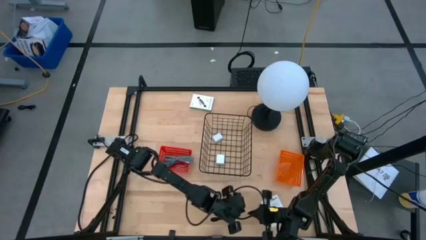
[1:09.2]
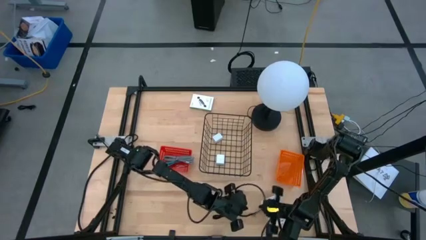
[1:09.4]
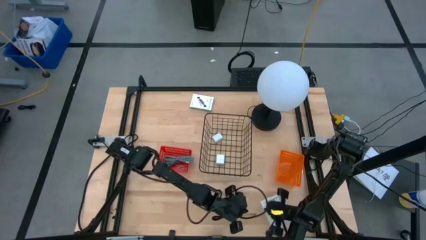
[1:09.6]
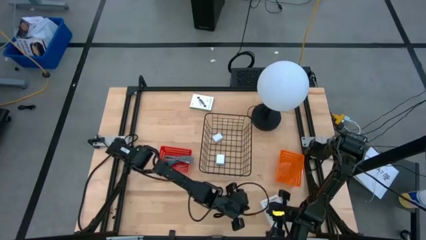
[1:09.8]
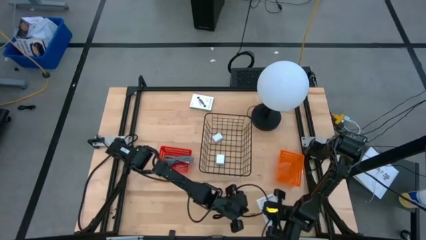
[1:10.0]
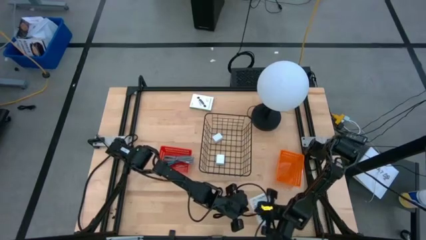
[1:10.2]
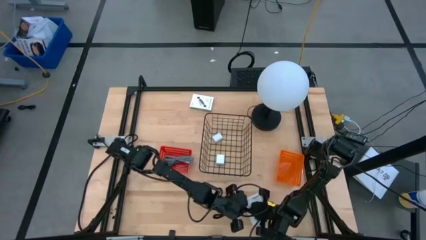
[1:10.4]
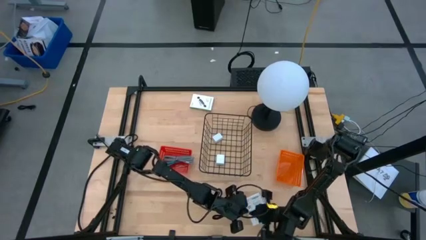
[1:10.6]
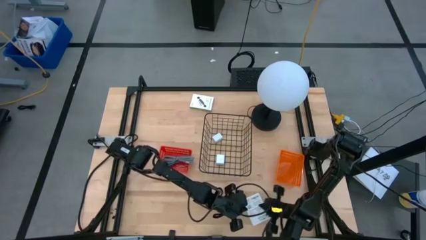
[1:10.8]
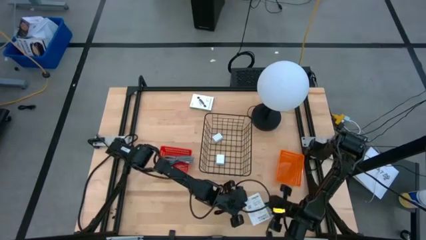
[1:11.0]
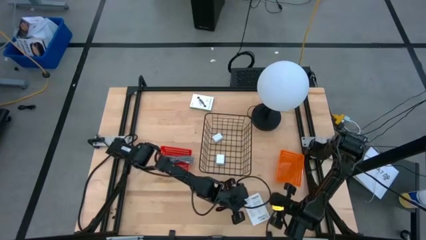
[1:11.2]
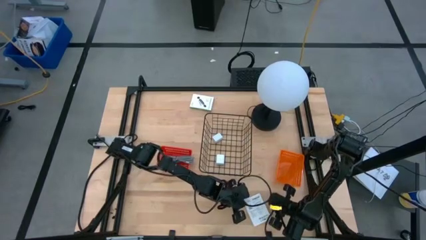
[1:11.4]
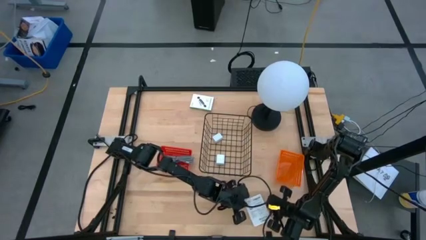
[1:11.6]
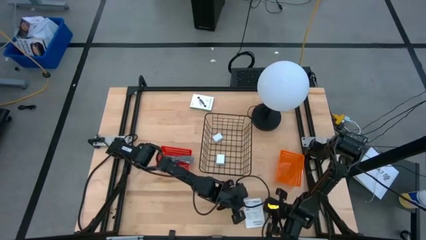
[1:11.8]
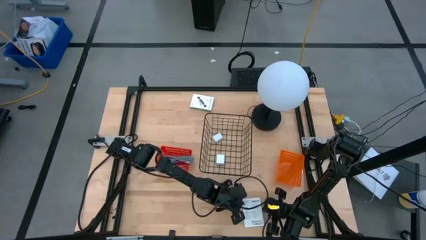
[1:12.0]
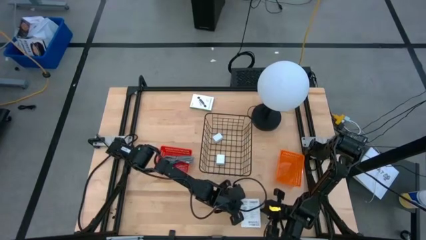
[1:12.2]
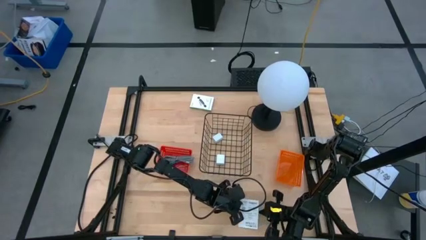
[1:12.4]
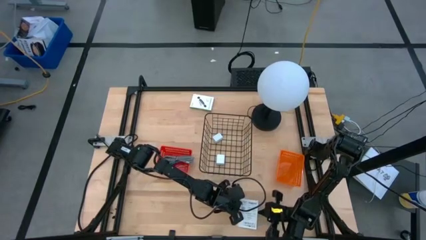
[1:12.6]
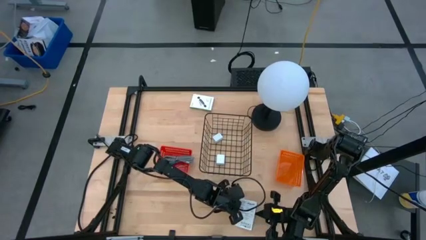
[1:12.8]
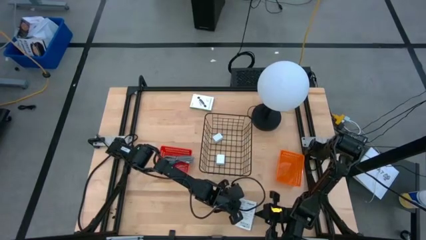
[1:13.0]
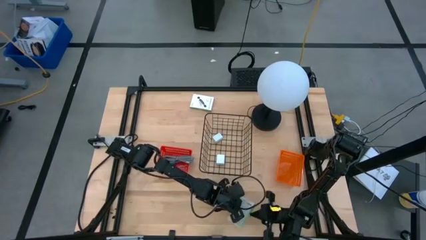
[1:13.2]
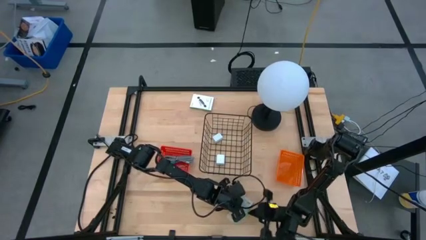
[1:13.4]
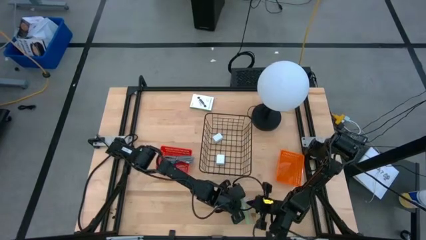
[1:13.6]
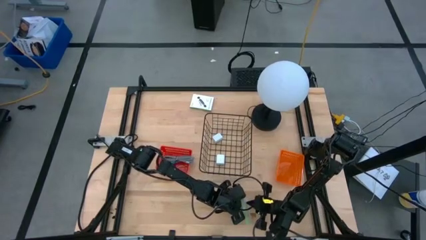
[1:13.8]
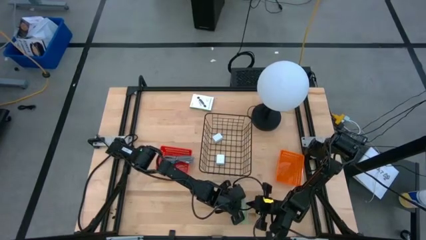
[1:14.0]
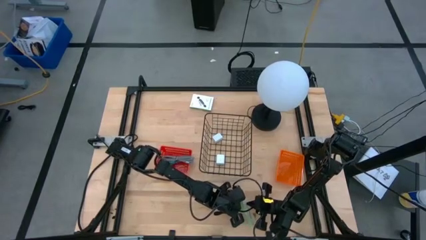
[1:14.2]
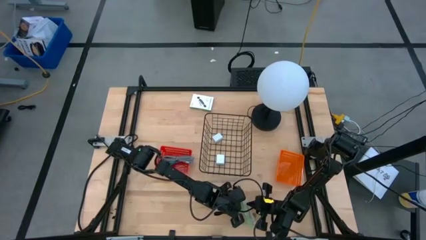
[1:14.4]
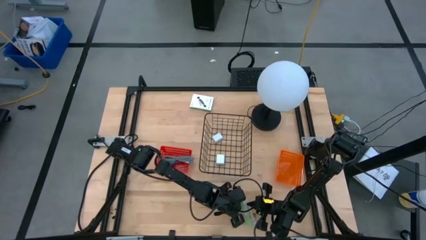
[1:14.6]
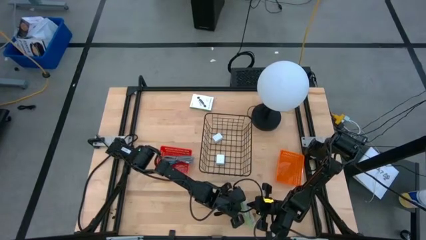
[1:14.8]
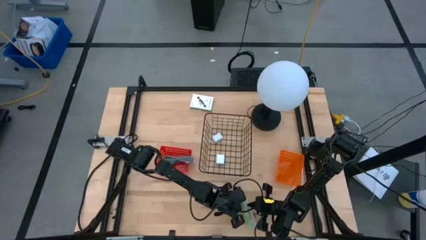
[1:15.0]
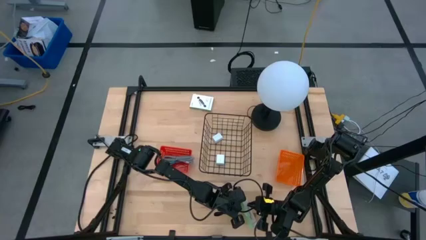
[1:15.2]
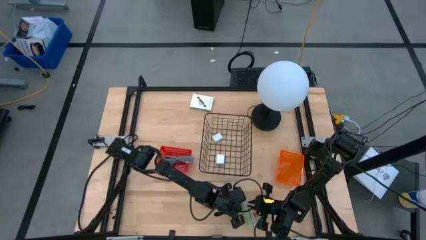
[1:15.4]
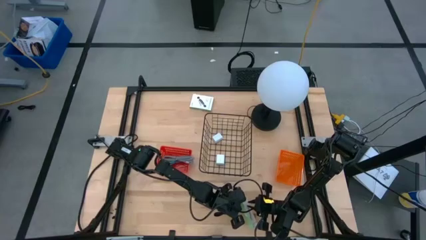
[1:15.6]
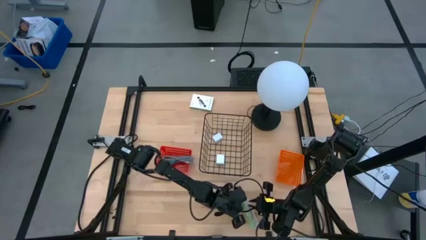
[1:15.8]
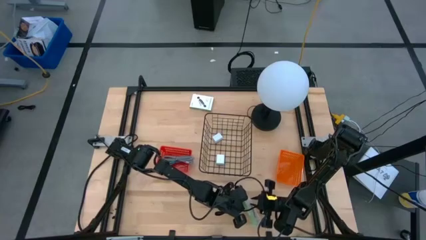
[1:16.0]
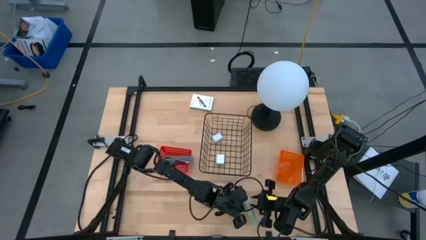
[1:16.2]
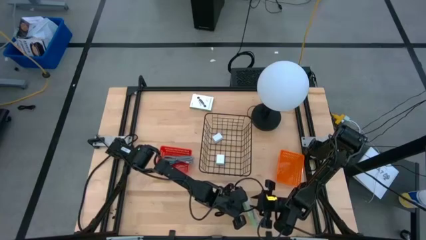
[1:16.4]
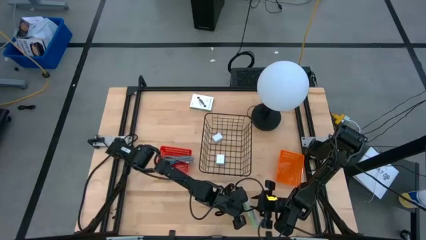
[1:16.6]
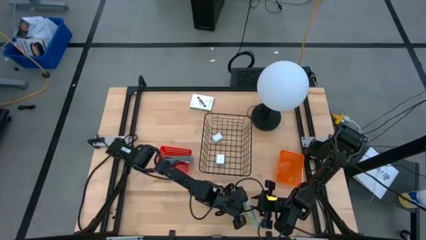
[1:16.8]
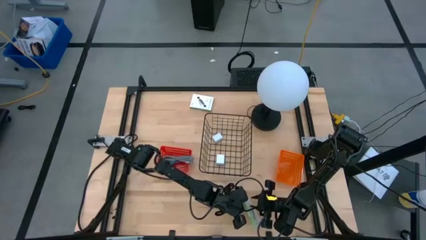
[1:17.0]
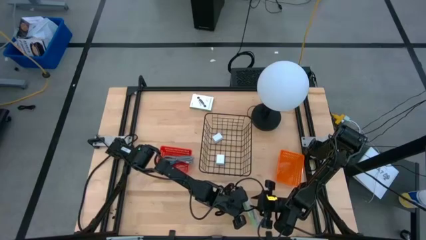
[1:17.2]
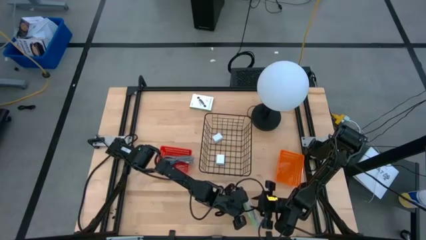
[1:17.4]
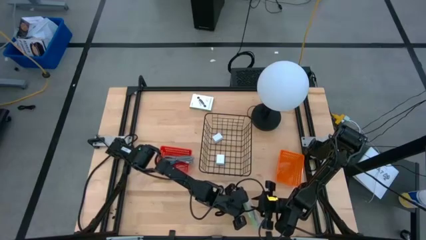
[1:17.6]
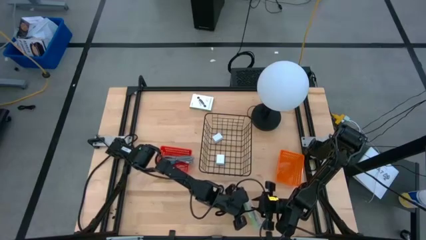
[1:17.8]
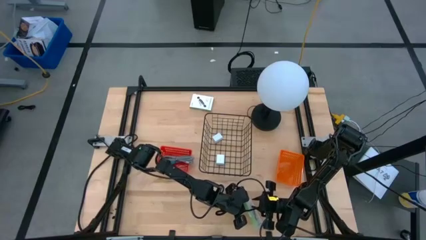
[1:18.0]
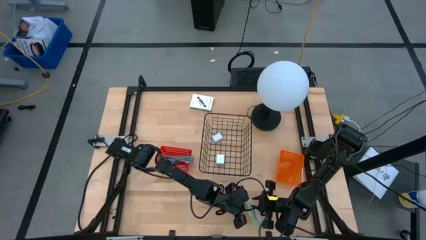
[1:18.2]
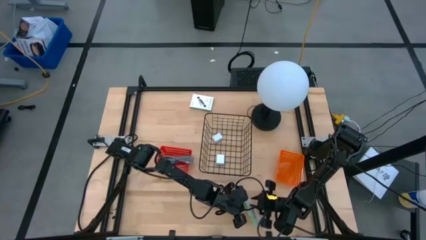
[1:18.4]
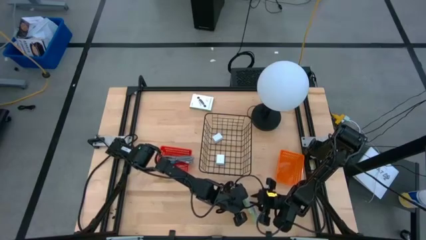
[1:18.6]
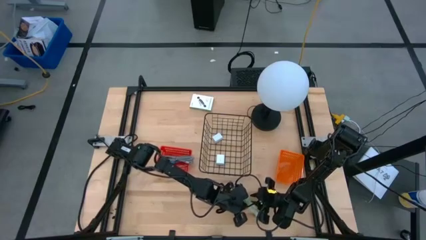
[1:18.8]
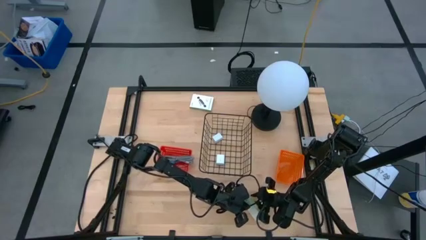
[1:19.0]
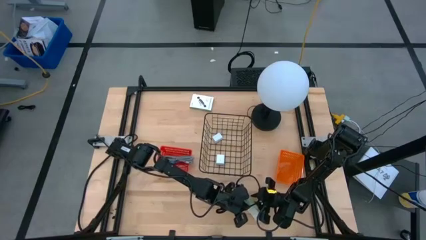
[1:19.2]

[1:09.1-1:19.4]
Task: Pick and place items into bin
Put the bottom card reader box into the orange basket

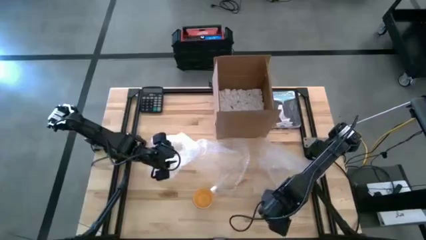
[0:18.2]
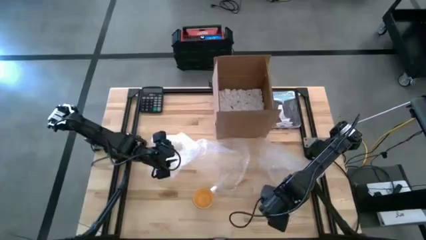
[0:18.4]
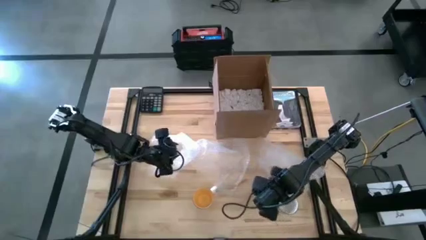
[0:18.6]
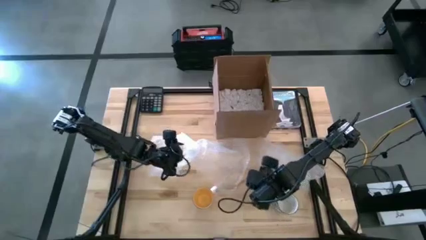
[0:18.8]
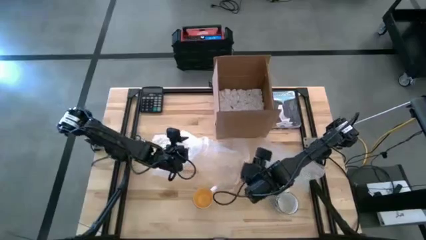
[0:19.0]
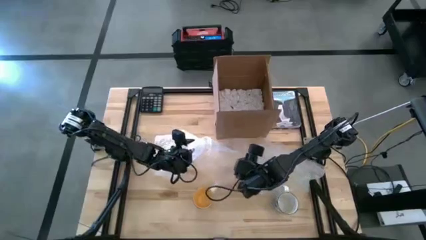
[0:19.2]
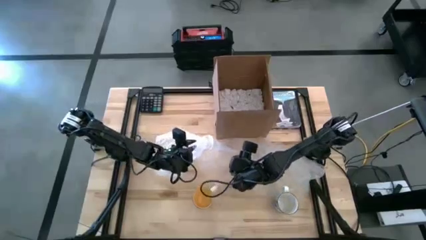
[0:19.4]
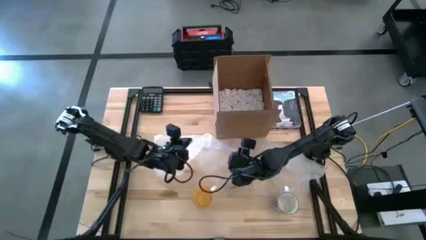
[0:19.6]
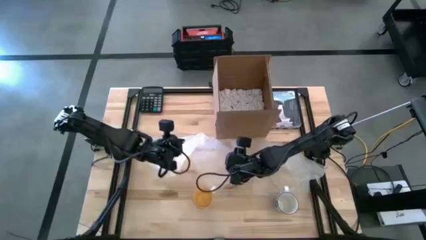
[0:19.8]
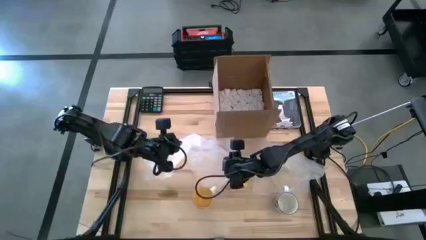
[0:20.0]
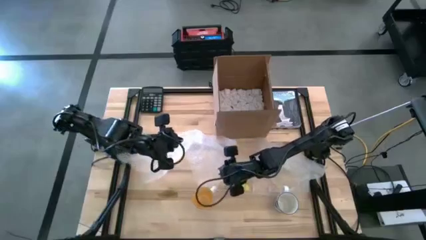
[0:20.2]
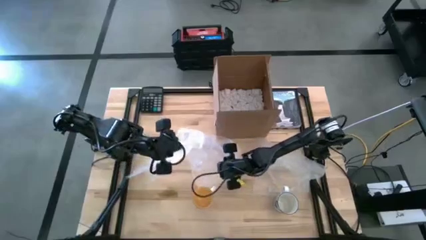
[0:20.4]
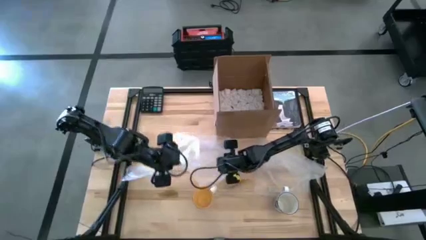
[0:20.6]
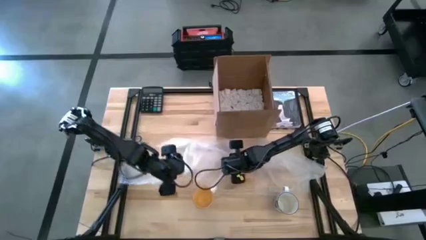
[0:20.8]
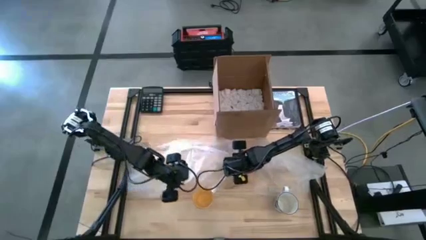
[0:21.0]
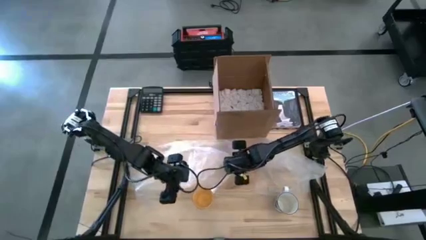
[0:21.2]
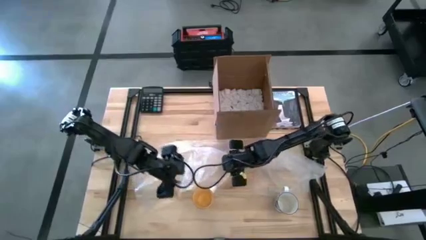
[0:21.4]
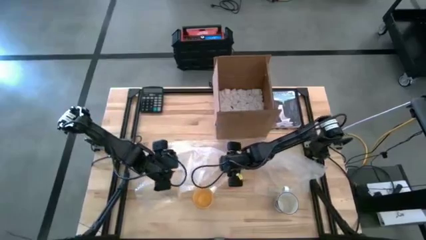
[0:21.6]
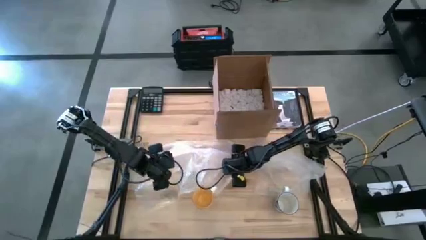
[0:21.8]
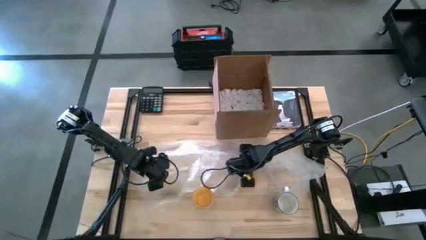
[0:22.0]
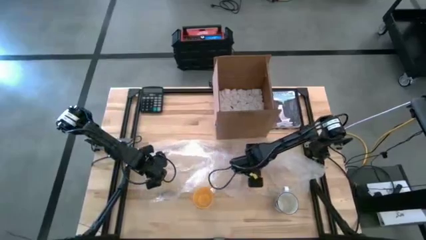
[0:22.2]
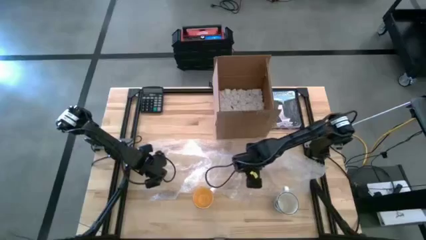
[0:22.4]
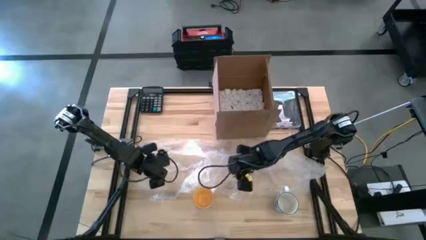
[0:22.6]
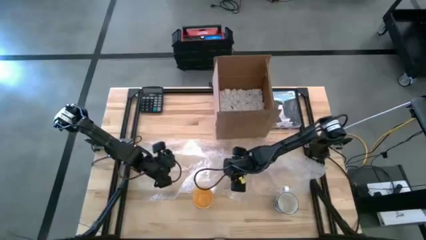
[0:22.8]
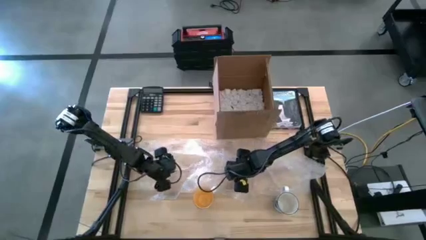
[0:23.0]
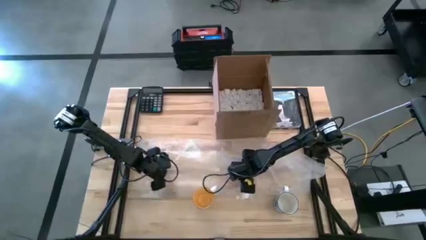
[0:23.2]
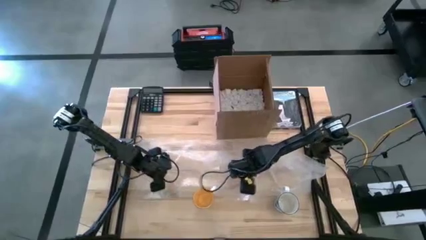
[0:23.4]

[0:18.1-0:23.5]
Task: wrap mug
Prepare the left transparent bubble wrap
